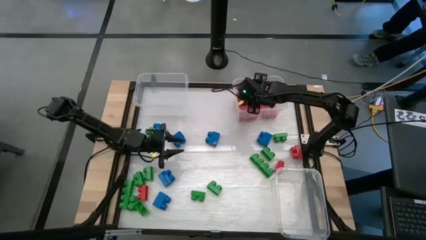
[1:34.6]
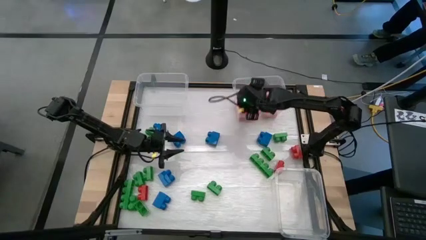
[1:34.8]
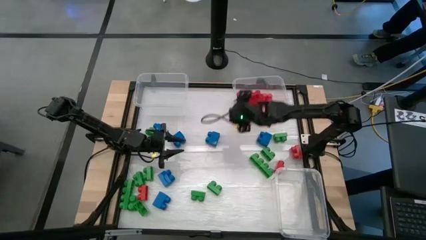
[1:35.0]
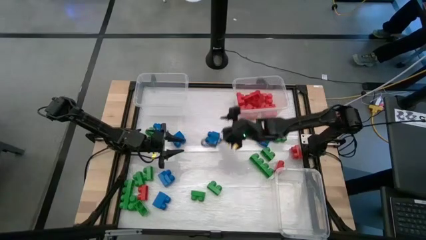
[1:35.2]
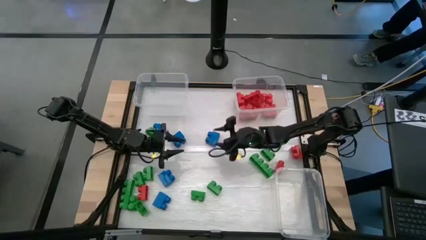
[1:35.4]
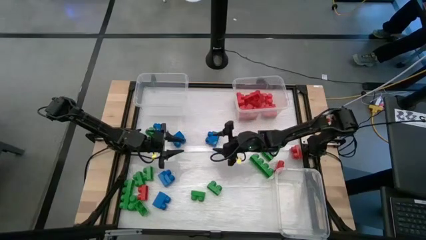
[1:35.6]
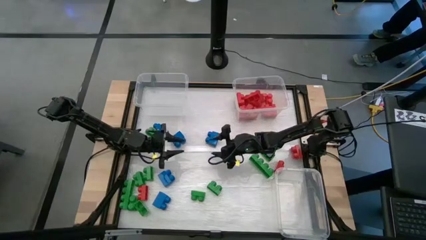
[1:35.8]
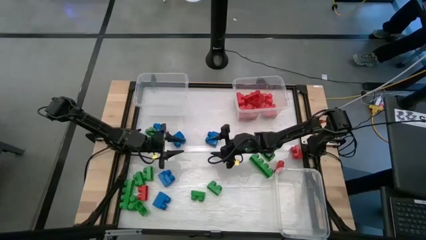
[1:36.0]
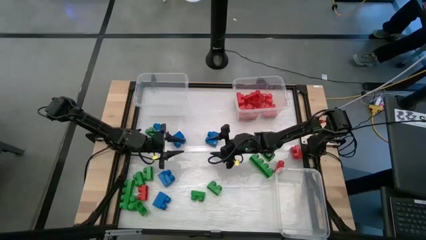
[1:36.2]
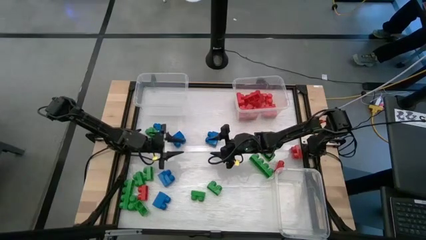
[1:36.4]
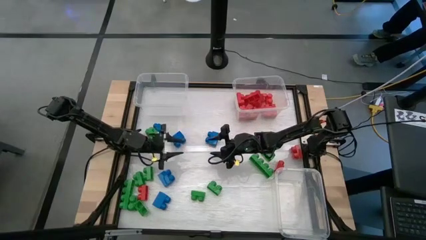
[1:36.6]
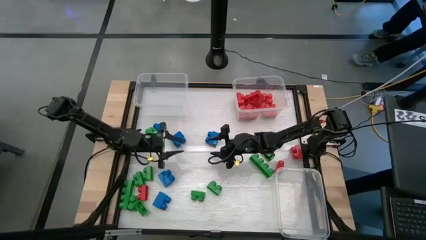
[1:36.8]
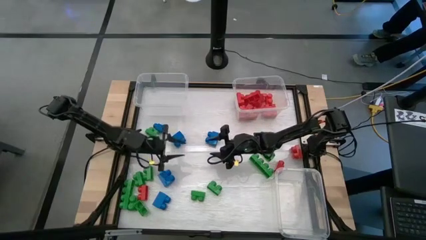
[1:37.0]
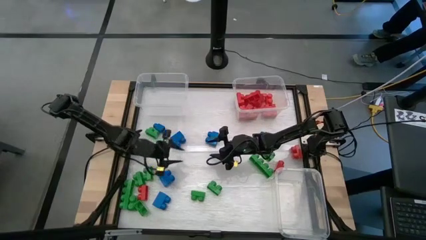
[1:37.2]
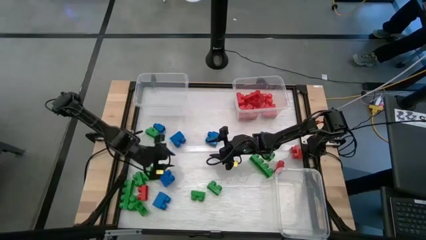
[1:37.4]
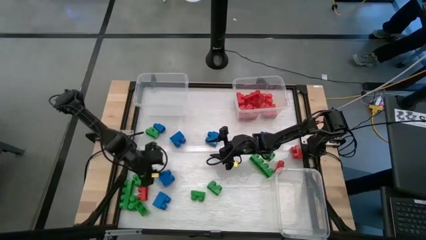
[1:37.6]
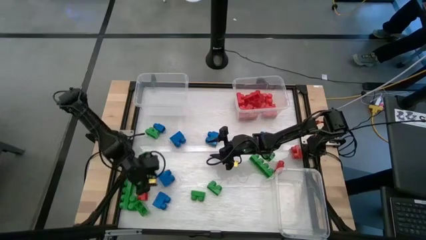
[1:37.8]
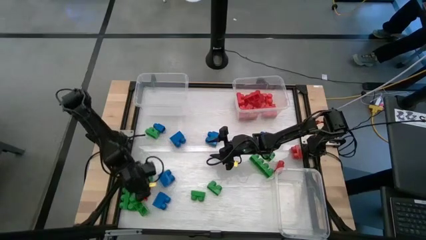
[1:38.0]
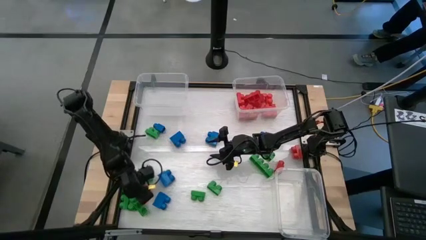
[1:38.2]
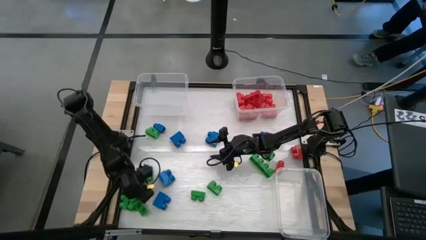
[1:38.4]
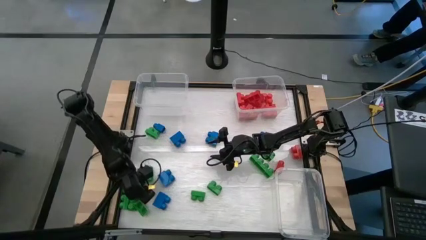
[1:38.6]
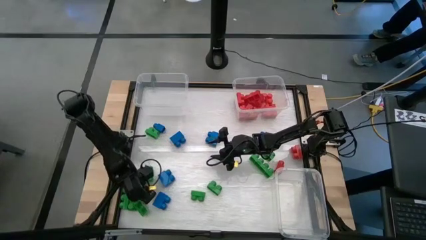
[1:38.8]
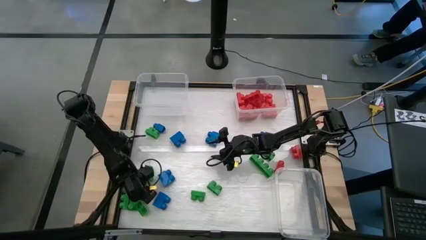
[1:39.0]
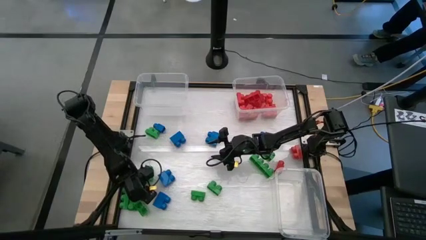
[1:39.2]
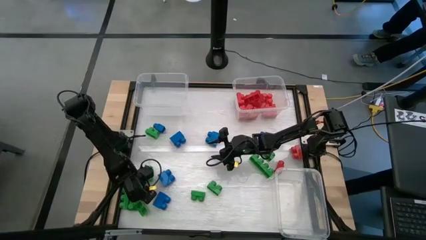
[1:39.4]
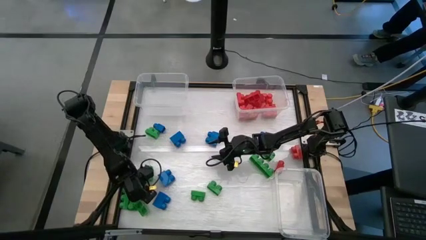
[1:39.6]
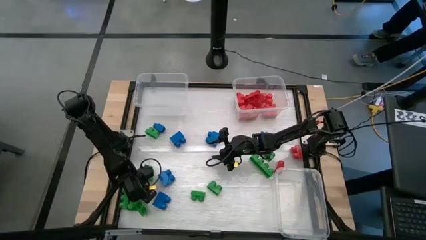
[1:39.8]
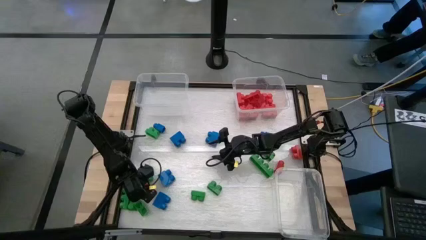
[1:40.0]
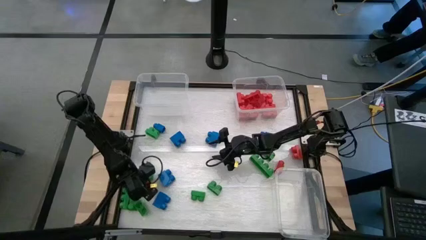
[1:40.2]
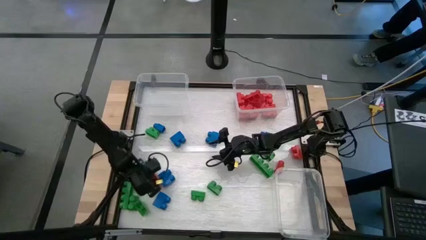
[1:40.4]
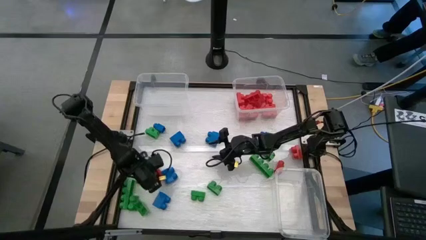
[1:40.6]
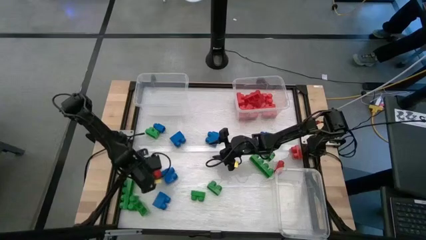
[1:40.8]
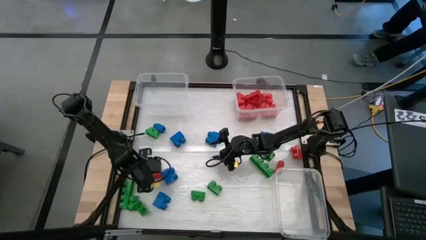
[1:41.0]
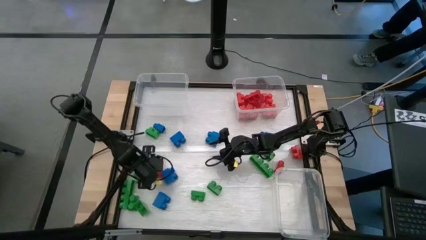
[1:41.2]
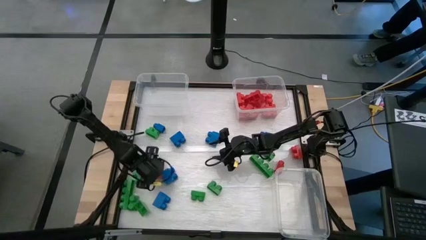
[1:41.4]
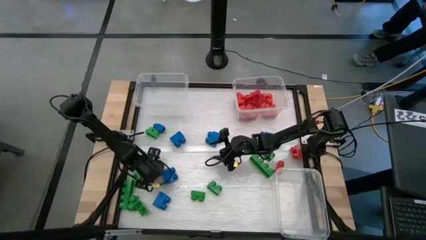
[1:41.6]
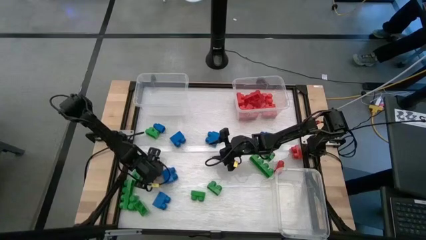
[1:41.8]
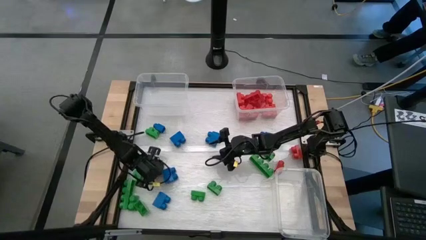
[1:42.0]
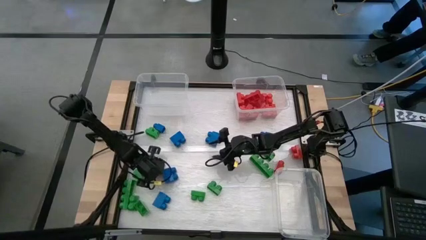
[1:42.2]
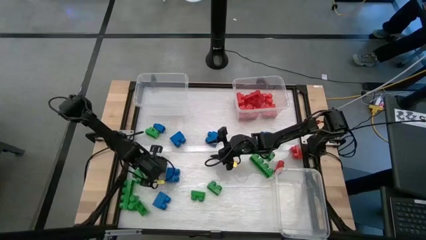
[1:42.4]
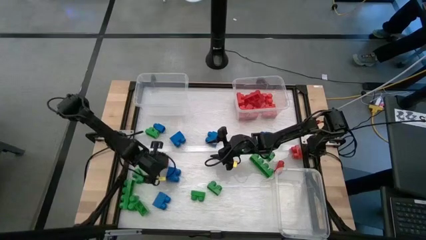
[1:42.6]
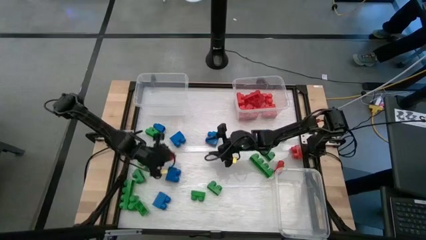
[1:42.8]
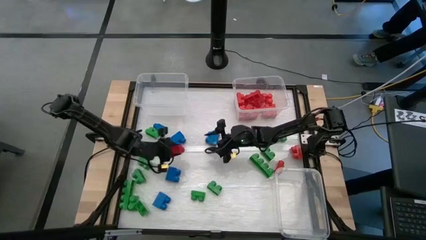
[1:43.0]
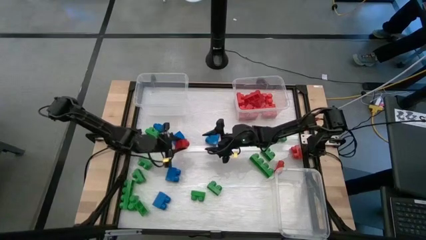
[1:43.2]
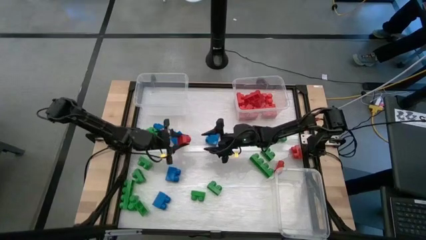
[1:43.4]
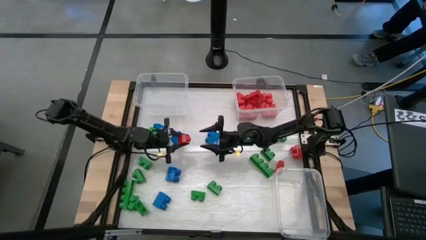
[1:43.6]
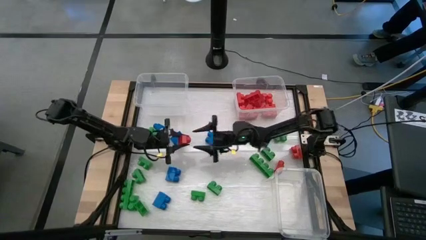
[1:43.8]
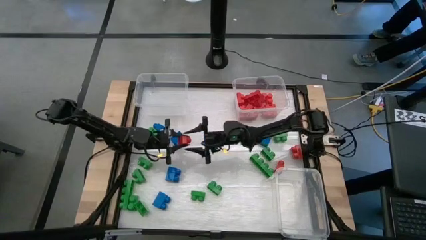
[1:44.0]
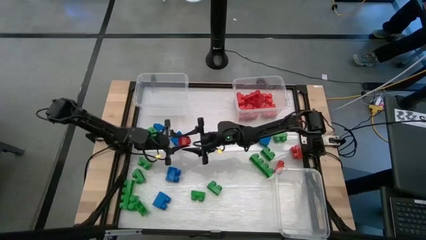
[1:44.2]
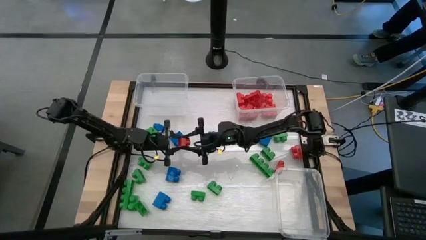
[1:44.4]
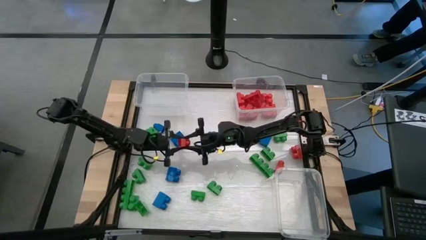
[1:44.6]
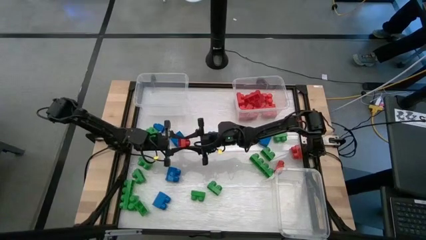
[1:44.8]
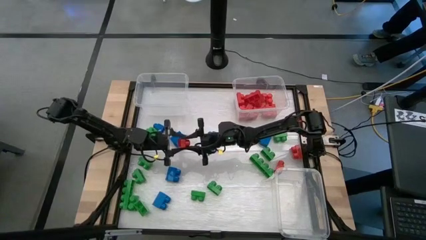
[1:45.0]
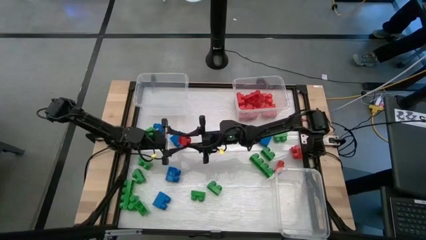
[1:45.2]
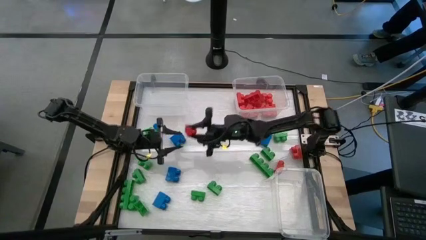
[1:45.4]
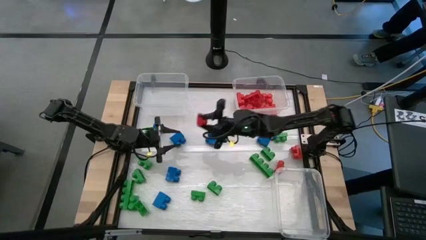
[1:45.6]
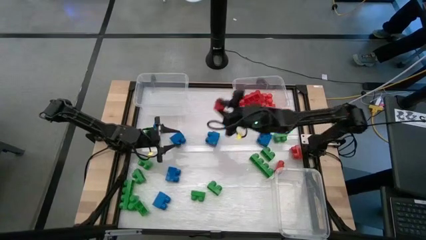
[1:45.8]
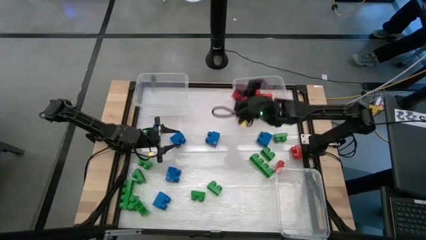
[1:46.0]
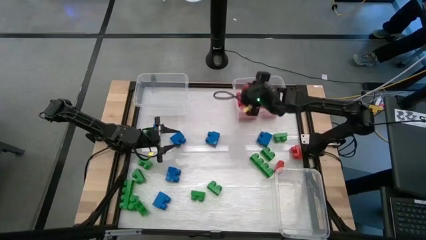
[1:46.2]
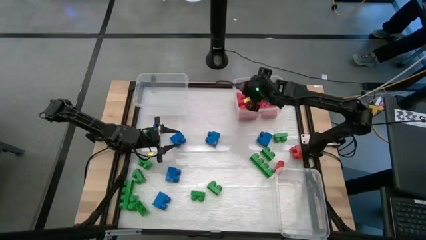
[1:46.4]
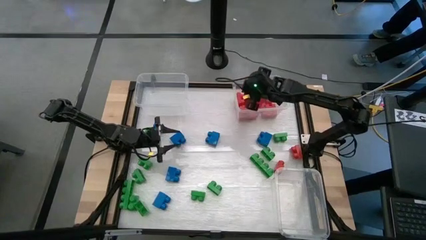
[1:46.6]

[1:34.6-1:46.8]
Task: Sort blocks
Put the red game piece into the top right transparent bin

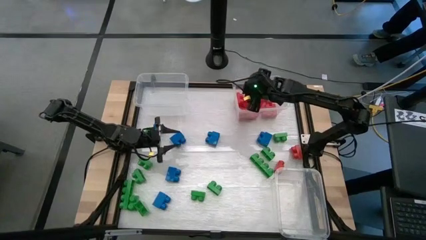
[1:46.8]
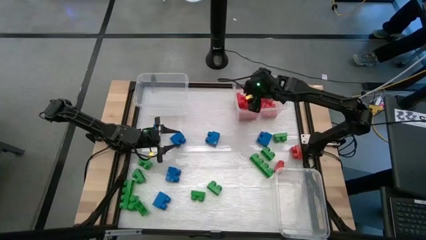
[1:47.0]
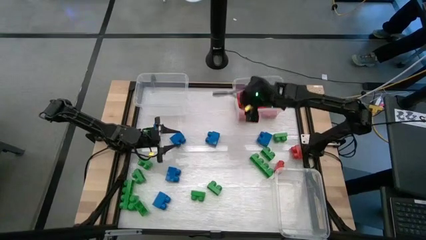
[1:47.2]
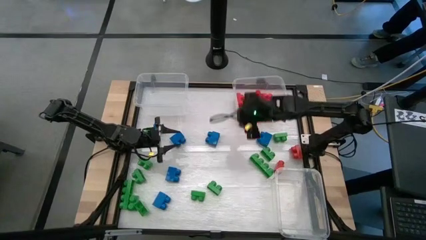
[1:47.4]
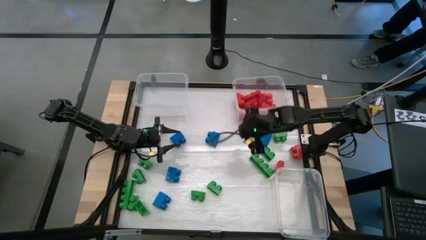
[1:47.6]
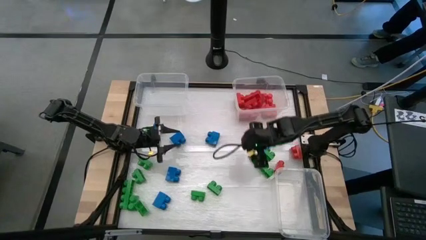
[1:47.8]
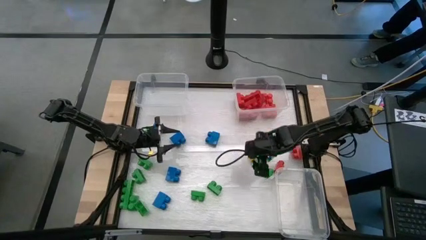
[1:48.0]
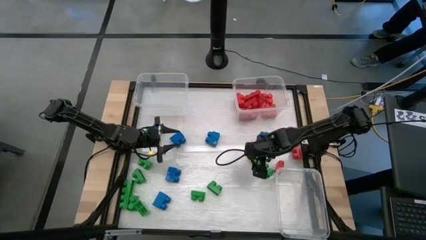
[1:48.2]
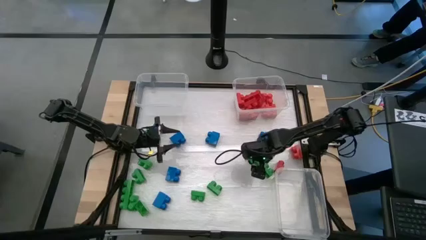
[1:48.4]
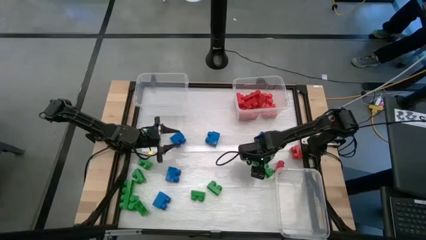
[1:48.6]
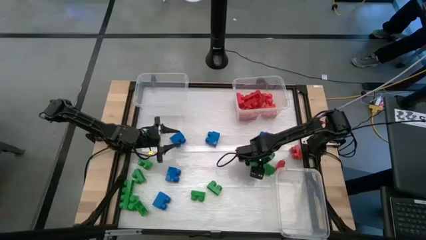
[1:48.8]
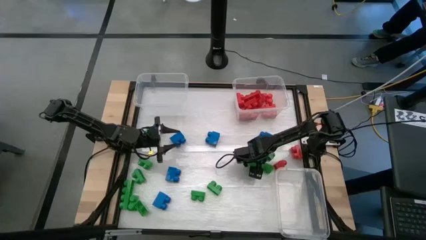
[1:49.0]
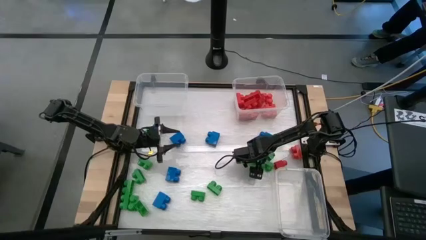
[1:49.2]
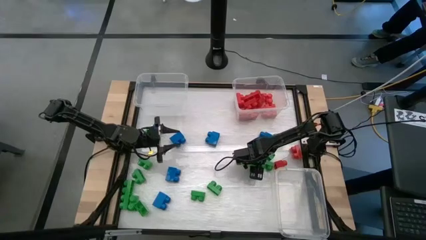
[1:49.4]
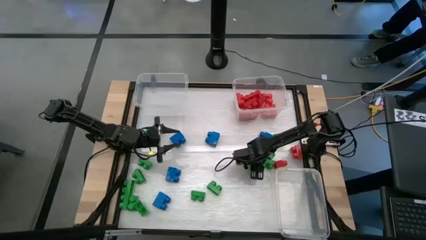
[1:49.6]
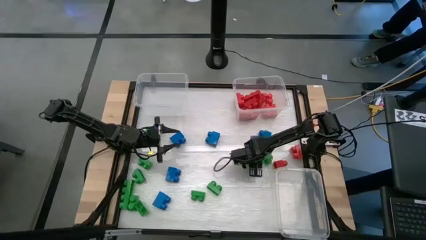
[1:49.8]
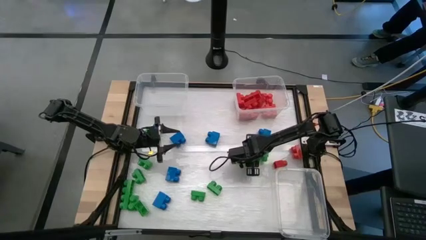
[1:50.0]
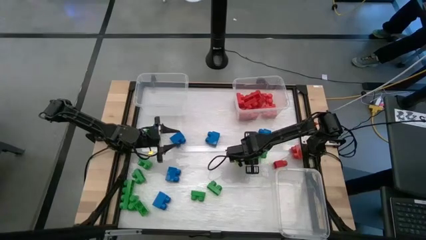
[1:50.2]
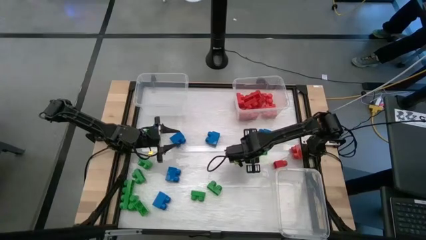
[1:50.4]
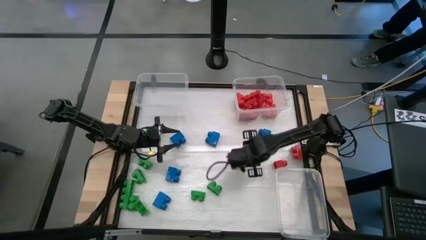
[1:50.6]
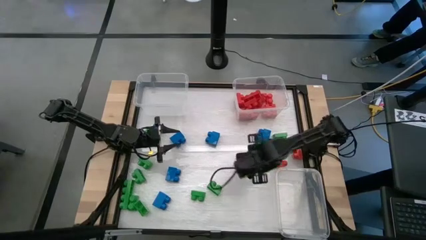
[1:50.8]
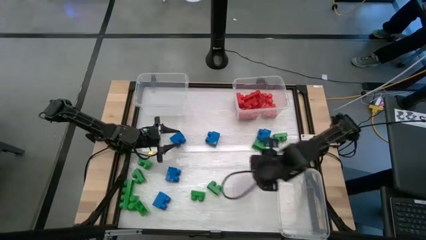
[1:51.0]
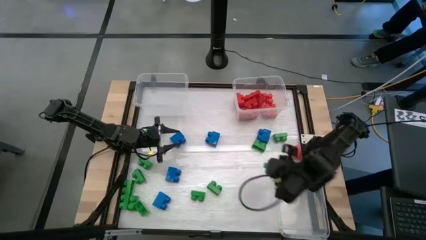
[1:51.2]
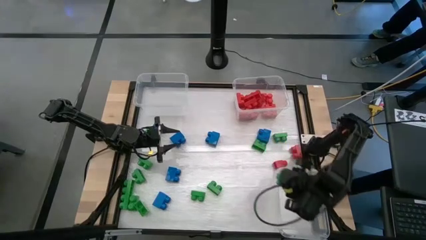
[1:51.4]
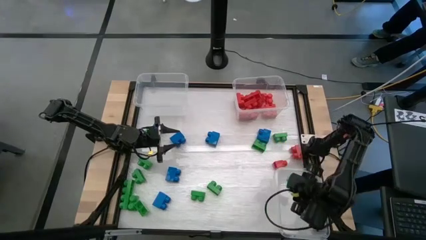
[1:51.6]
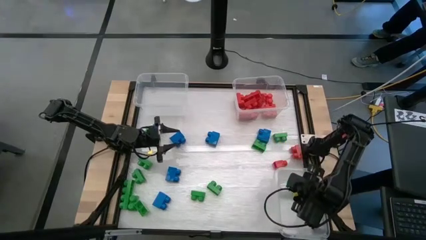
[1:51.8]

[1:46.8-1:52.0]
Put the green game piece into the bottom right transparent bin
